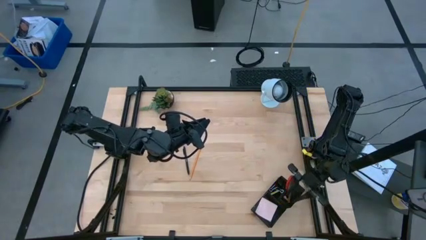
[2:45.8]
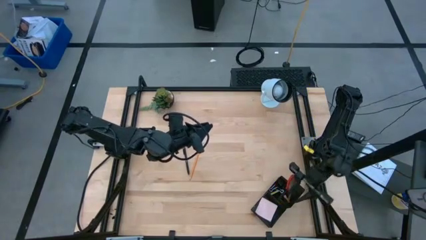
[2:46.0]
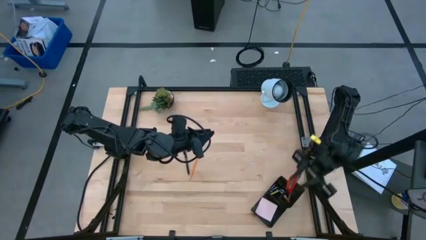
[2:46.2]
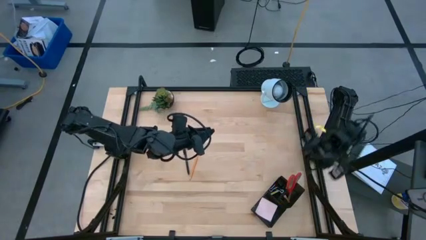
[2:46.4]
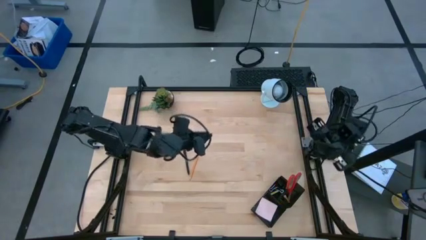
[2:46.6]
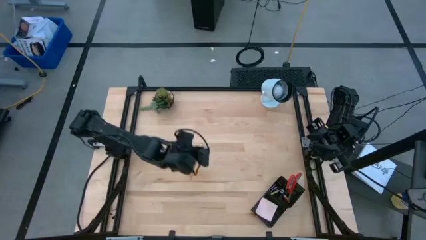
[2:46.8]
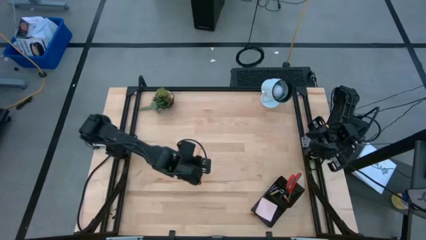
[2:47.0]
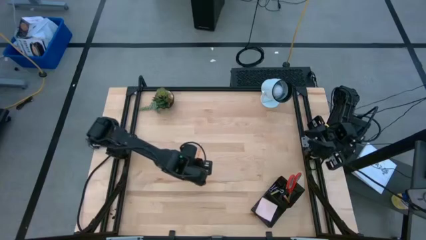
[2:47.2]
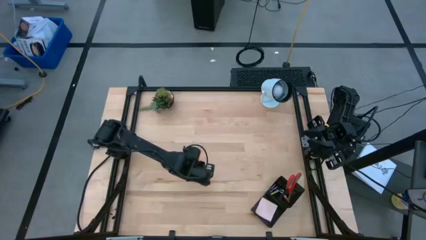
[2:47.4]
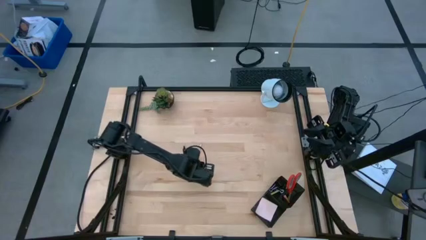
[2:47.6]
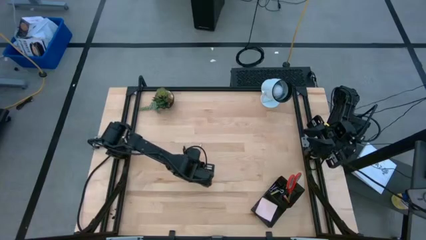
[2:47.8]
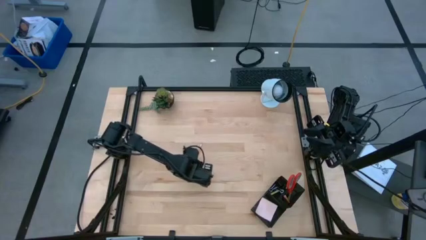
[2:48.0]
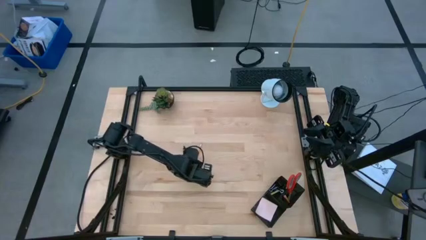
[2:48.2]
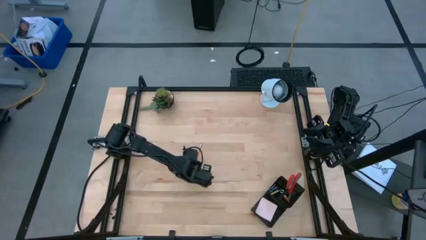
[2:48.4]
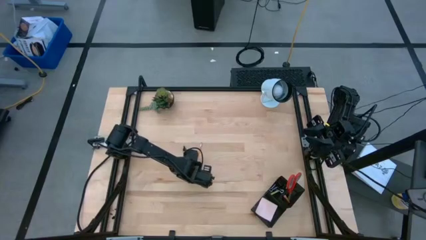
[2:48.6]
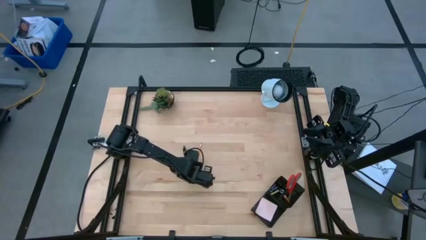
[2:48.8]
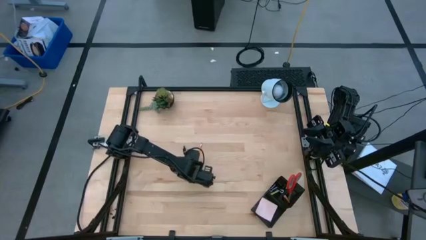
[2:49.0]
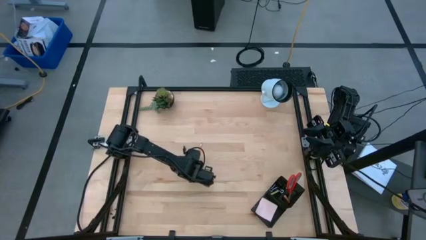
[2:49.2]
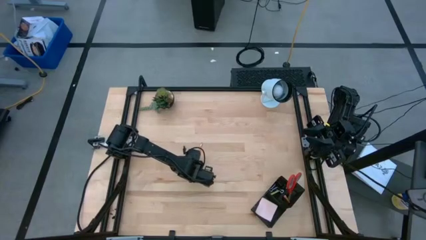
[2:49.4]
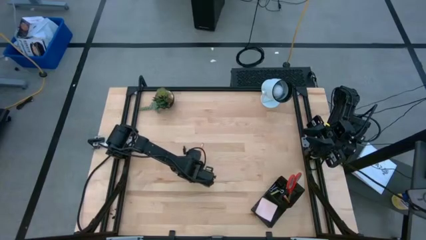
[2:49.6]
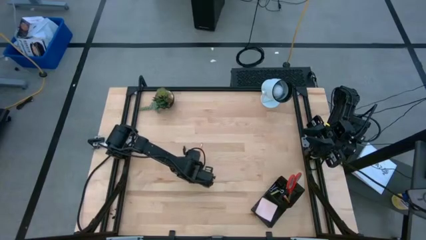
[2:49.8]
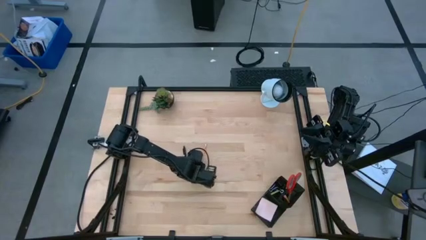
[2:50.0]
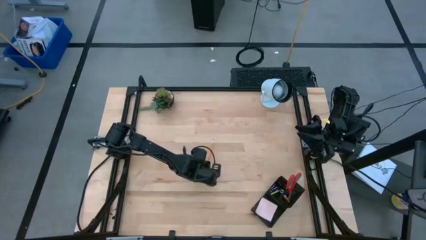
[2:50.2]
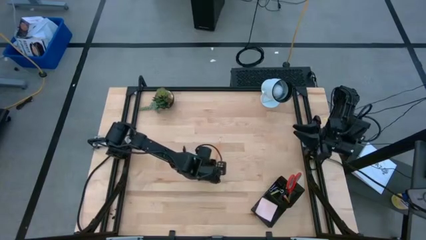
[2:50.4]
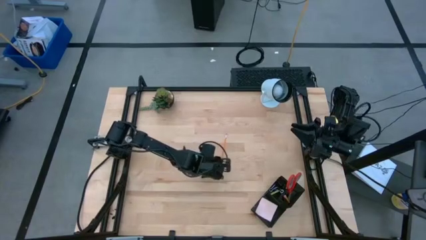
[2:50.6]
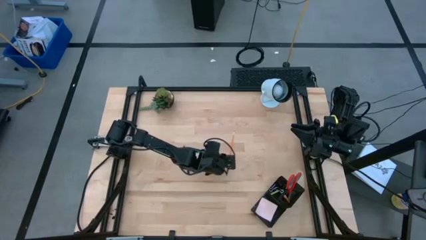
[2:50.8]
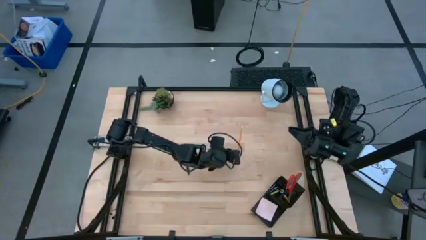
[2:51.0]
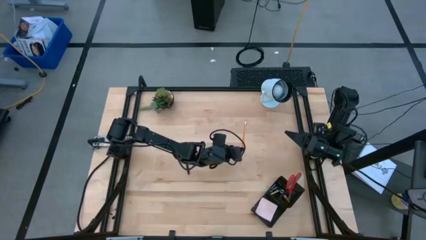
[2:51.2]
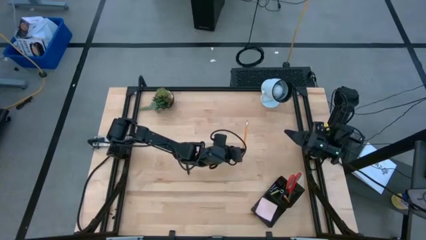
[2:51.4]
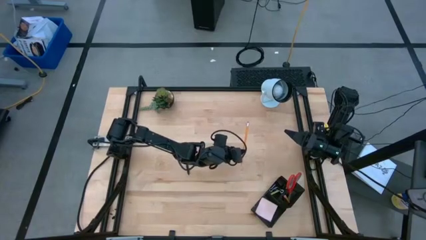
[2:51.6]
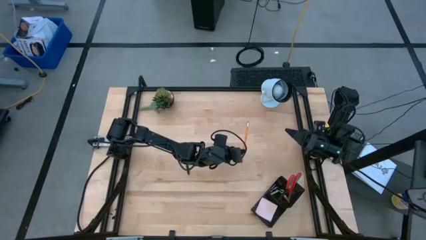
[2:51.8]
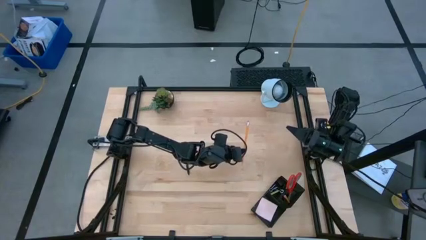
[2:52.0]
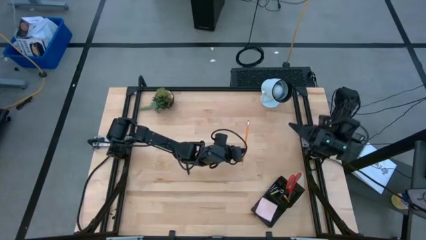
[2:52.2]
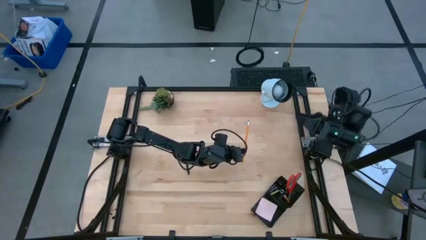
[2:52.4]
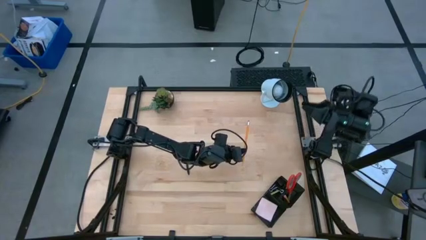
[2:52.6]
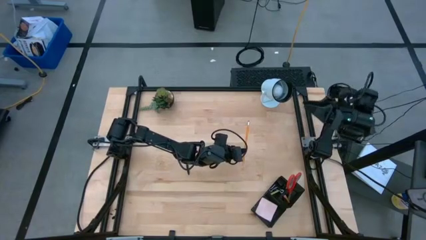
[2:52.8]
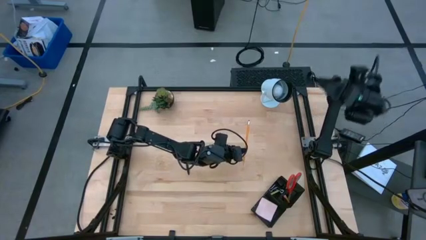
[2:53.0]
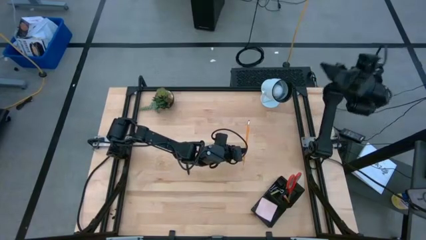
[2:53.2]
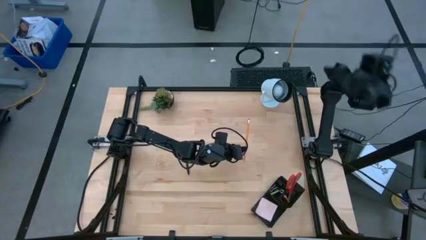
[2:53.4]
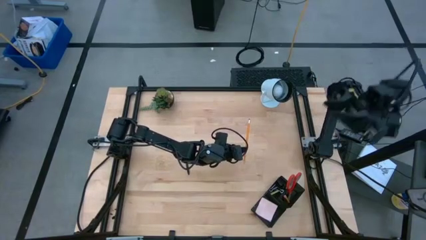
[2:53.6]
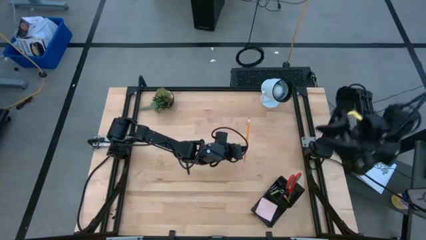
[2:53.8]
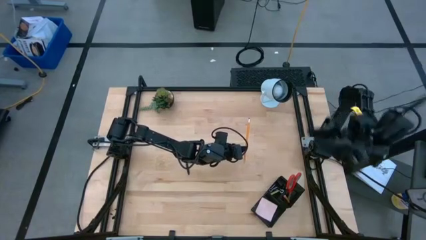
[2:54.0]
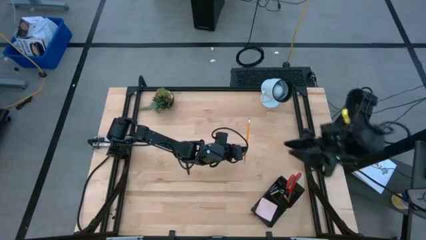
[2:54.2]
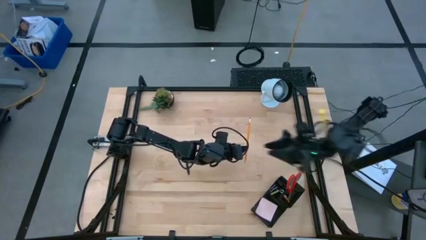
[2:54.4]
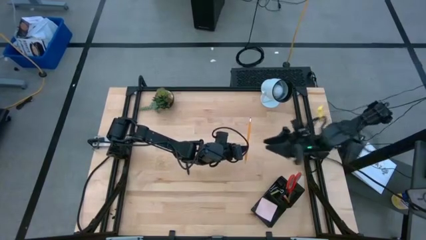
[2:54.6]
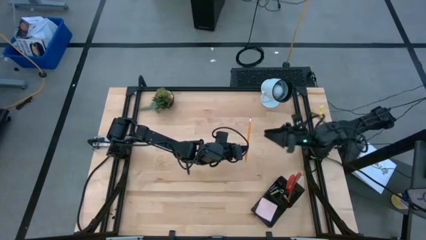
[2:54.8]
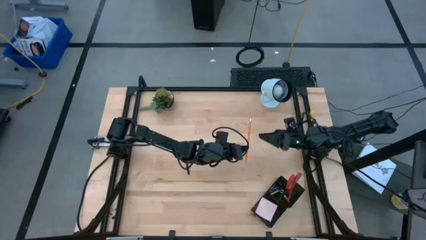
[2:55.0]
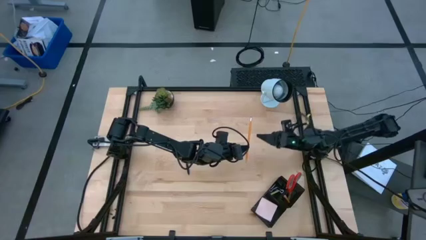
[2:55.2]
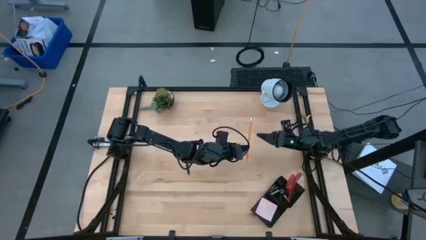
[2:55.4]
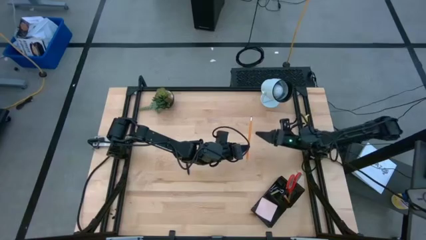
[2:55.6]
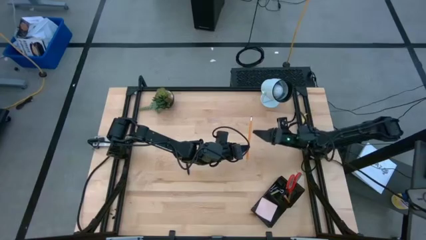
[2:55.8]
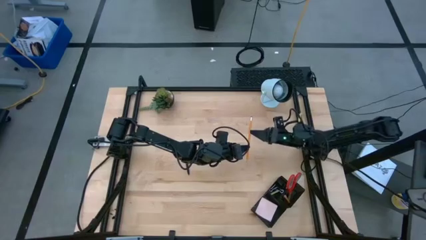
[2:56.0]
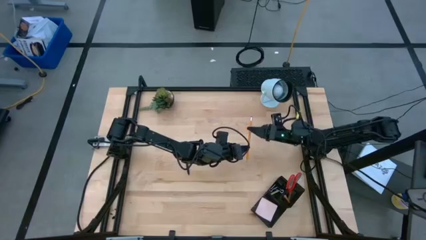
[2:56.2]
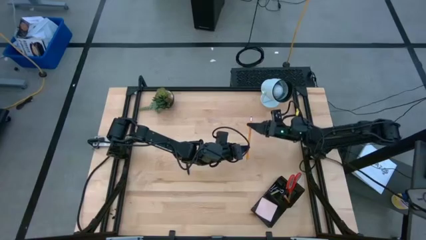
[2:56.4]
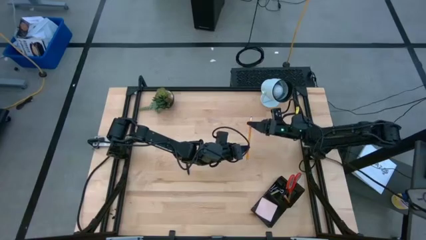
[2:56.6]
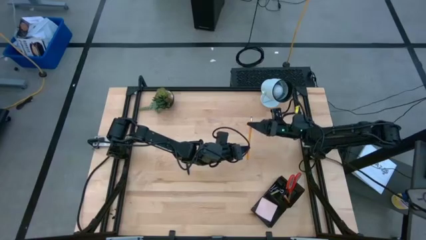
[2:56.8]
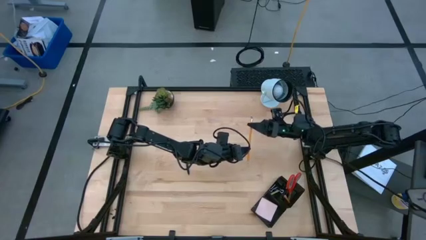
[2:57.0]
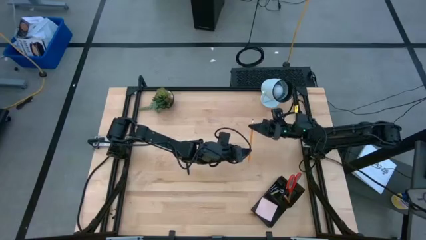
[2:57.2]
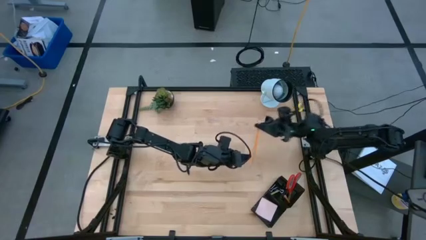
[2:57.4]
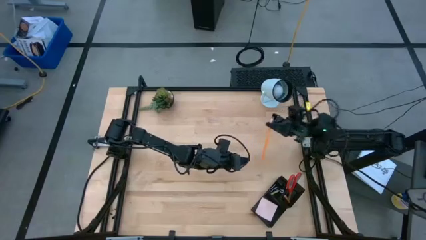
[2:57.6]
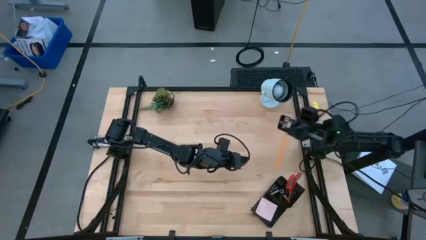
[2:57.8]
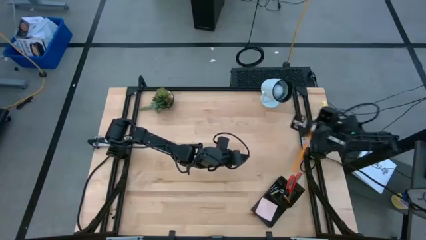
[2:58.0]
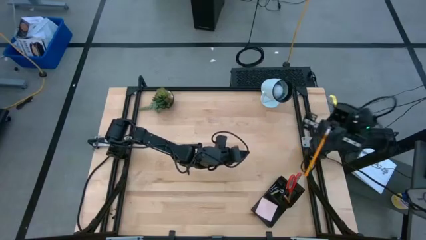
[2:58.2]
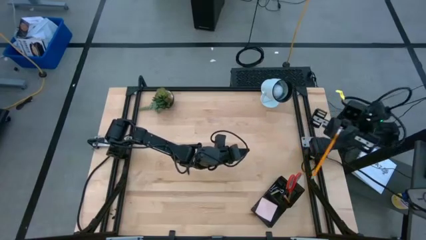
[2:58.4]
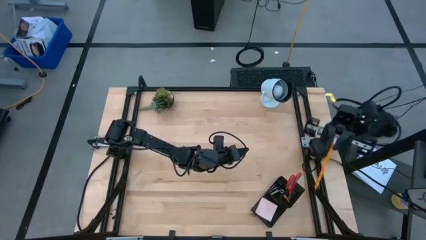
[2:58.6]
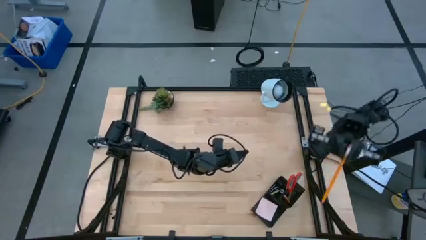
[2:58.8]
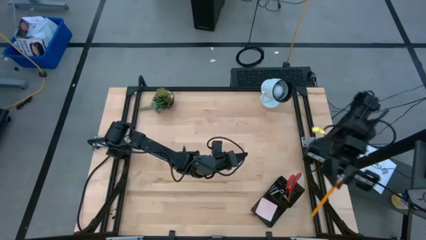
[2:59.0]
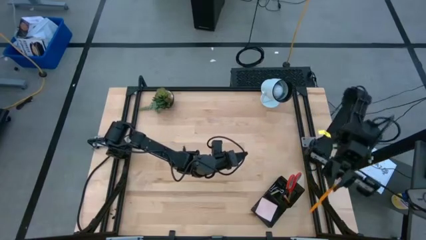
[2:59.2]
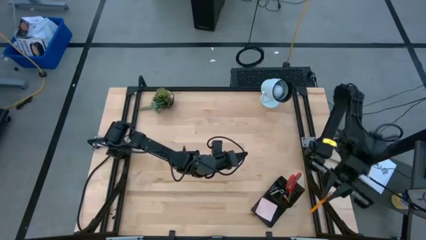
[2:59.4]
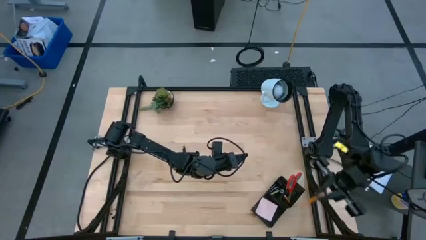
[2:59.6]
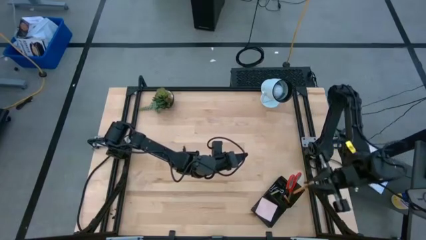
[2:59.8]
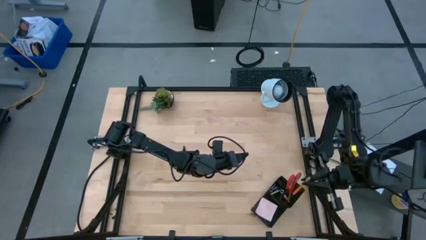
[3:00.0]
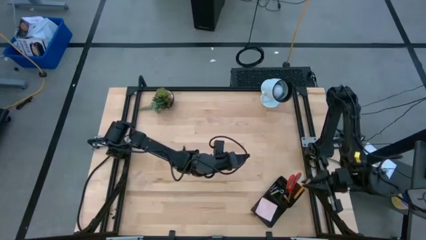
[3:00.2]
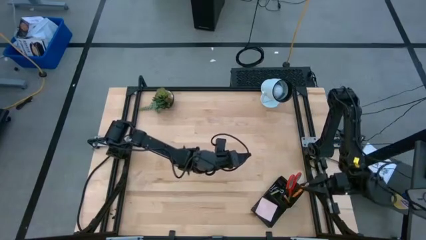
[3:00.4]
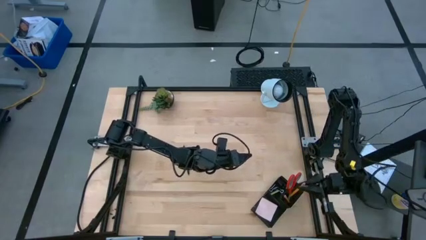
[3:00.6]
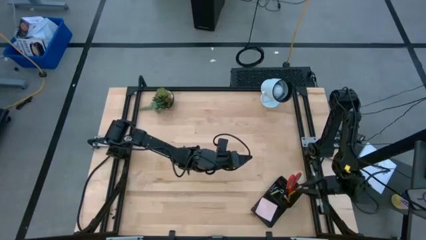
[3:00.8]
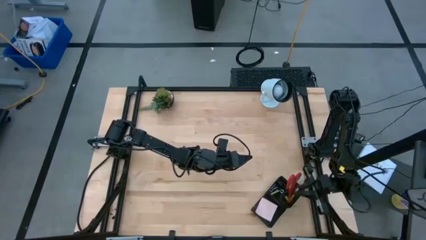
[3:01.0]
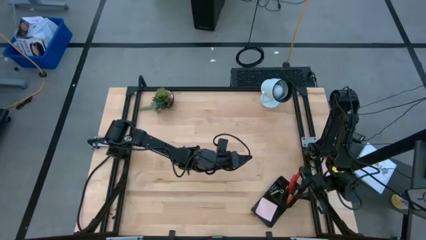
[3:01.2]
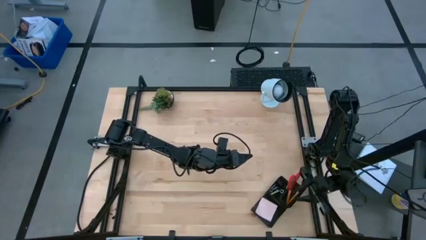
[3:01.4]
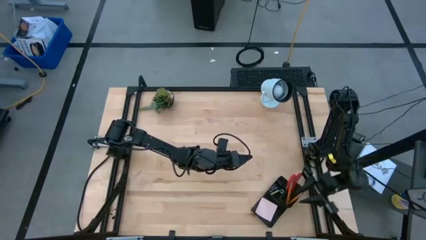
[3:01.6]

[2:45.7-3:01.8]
Task: Pick and place office supplies into organizer
Put the light orange pencil into the desk organizer

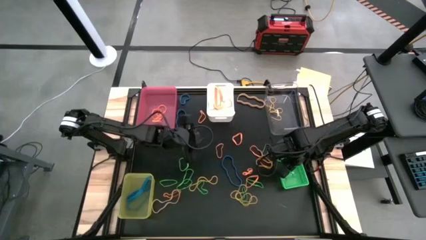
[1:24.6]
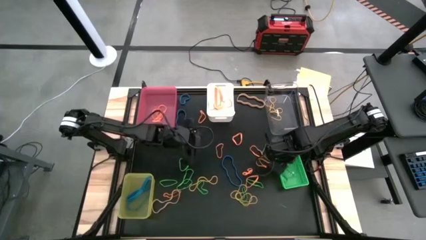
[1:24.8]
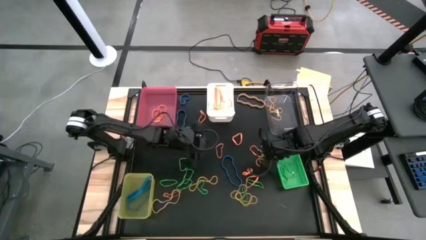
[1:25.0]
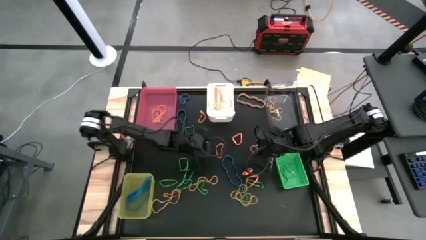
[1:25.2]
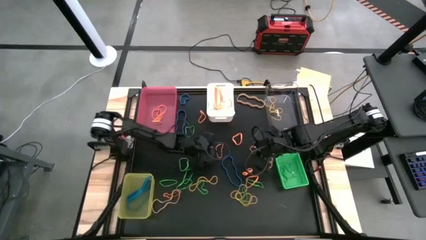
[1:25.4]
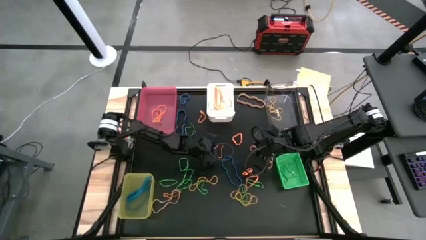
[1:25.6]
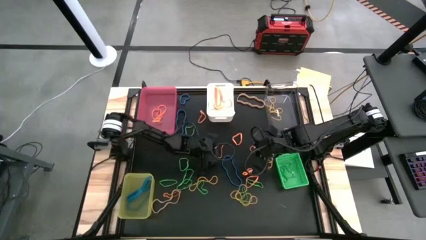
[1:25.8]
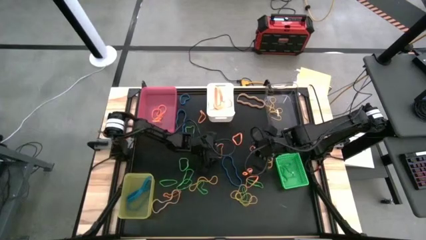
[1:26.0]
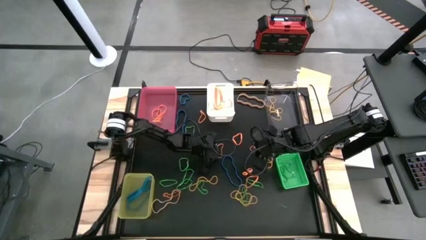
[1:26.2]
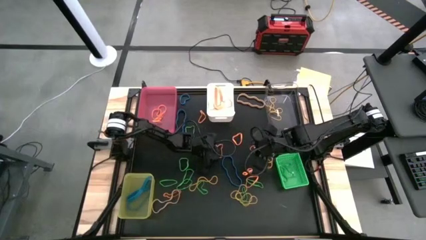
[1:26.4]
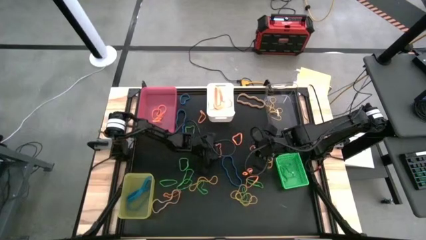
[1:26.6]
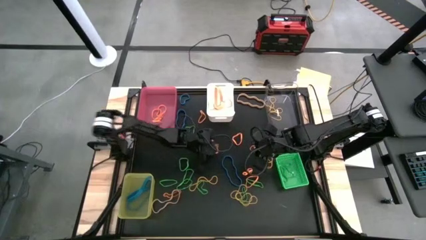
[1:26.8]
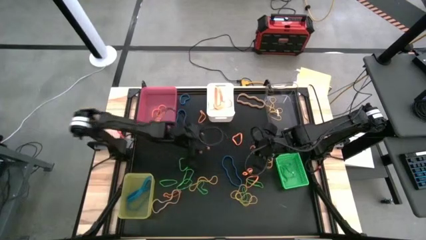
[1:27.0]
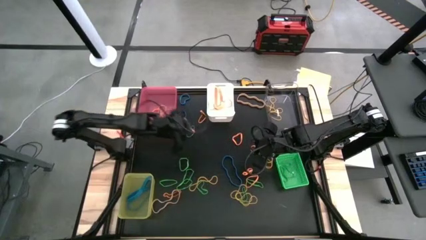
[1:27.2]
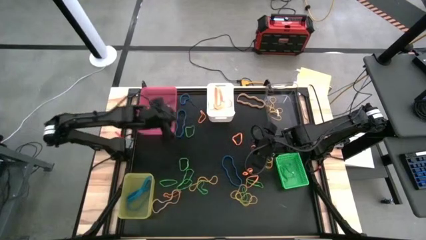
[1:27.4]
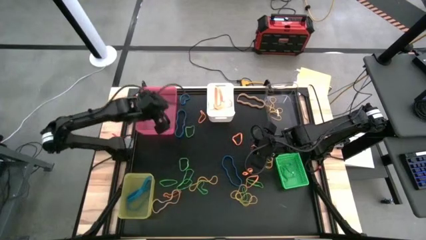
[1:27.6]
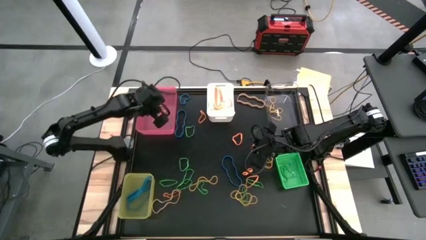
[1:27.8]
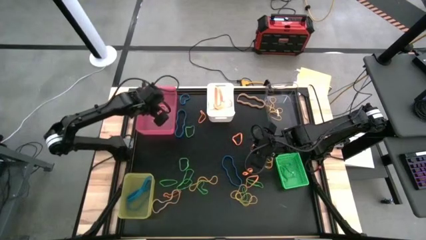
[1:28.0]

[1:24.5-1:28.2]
Task: Sort rubber bands into baskets
Put the orange rubber band into the pink bin
